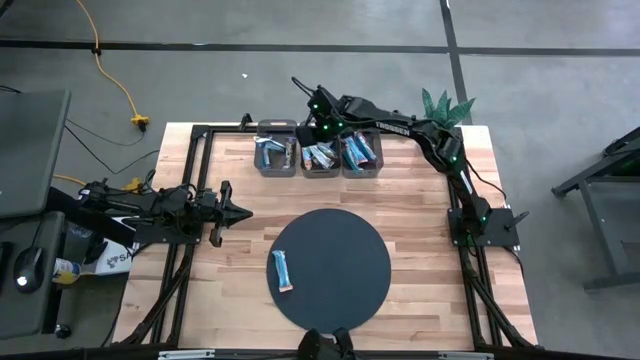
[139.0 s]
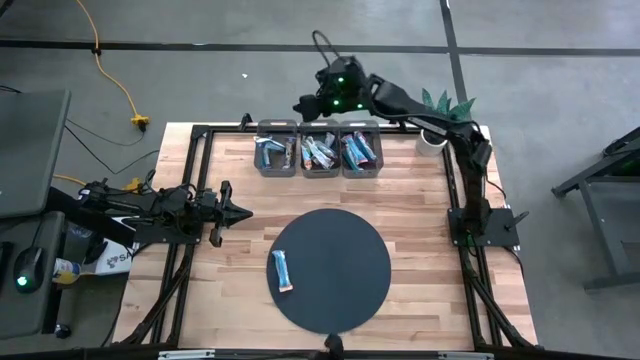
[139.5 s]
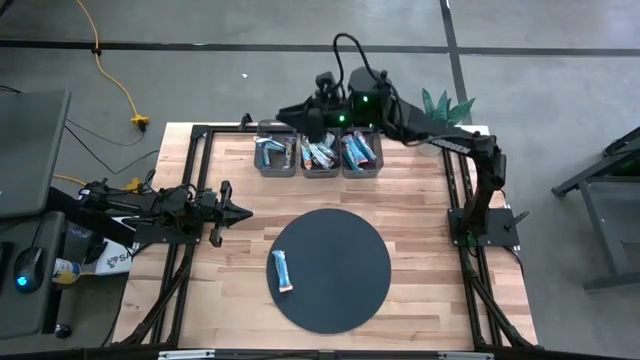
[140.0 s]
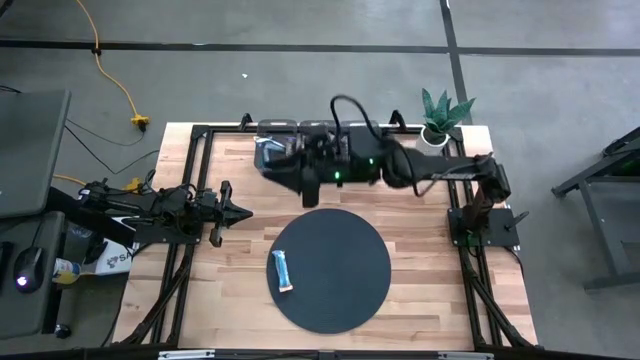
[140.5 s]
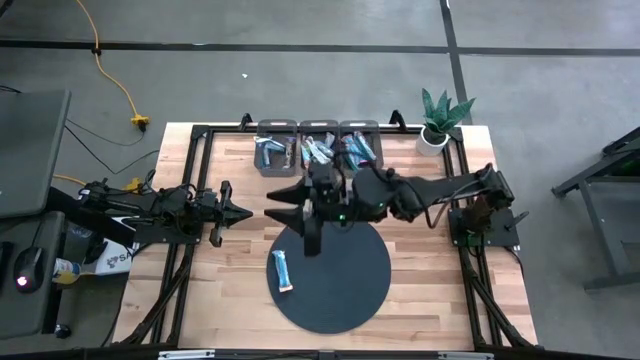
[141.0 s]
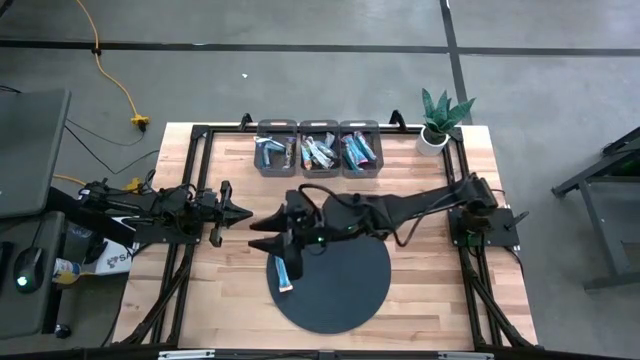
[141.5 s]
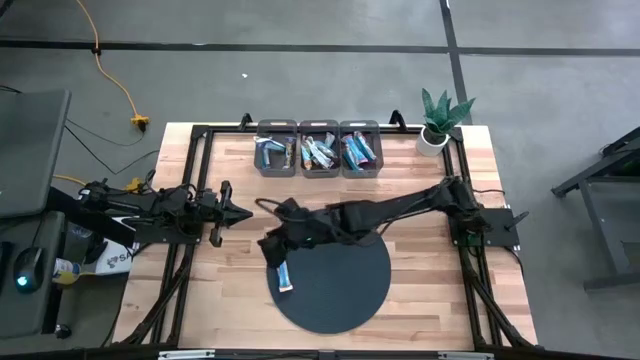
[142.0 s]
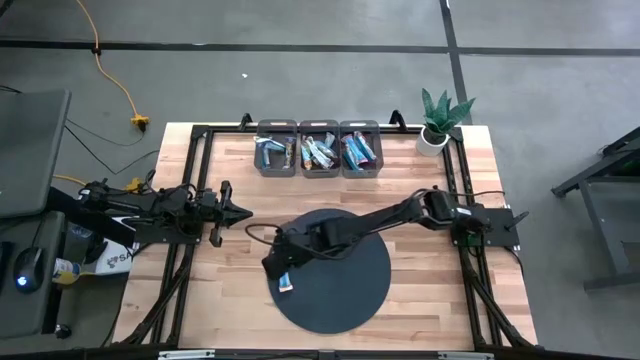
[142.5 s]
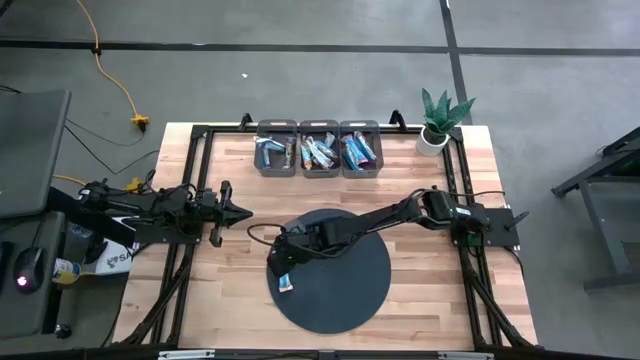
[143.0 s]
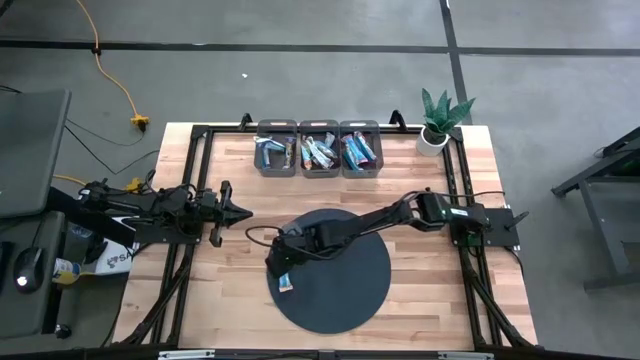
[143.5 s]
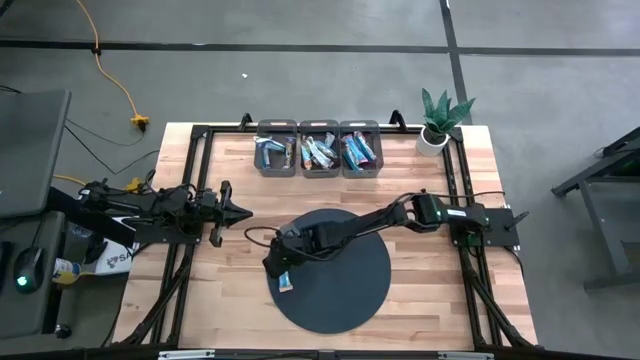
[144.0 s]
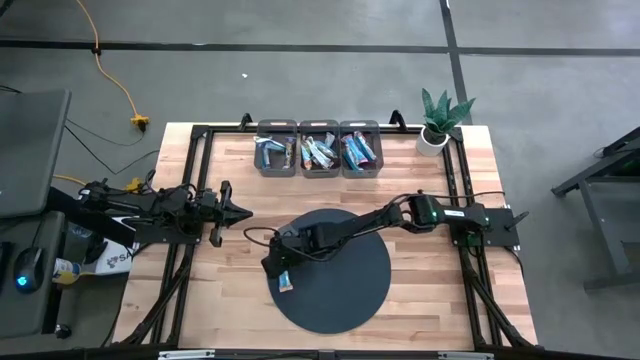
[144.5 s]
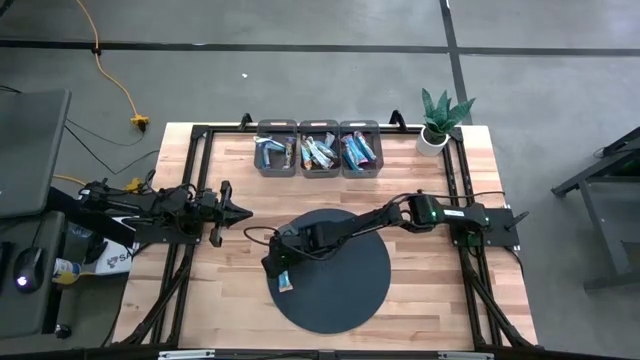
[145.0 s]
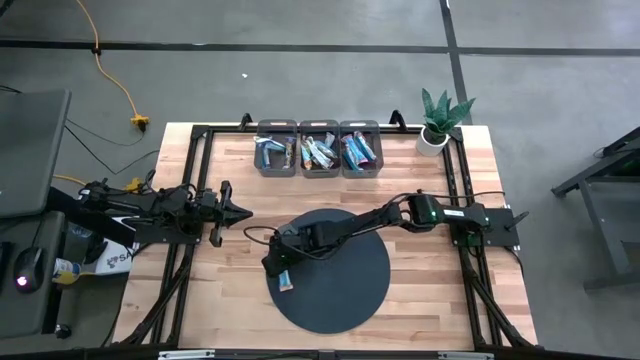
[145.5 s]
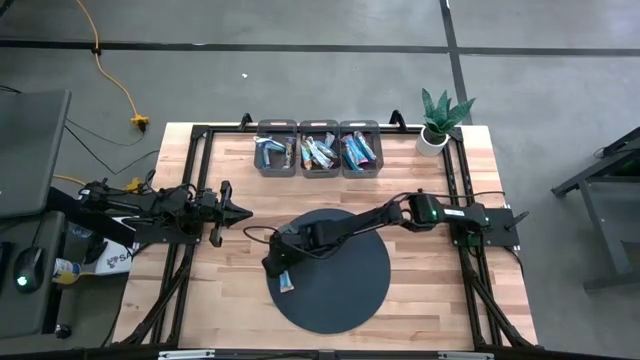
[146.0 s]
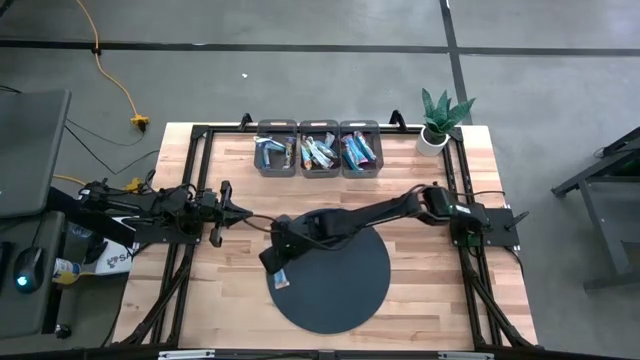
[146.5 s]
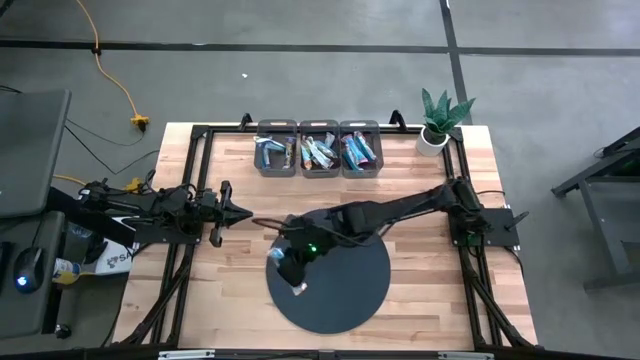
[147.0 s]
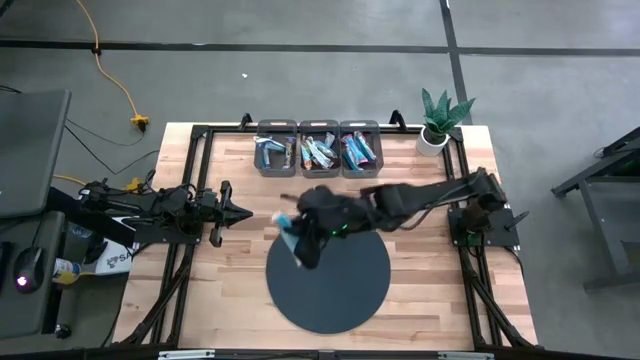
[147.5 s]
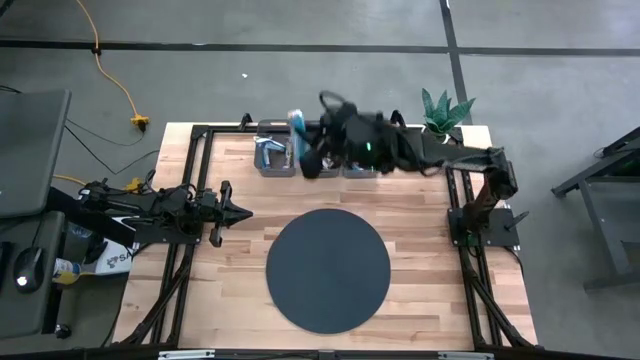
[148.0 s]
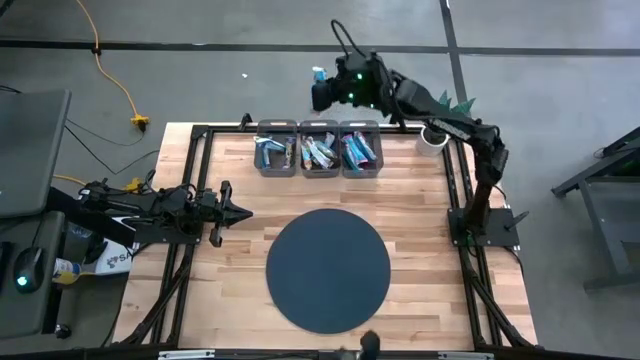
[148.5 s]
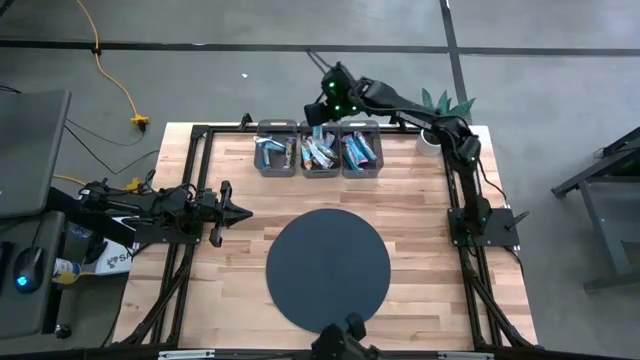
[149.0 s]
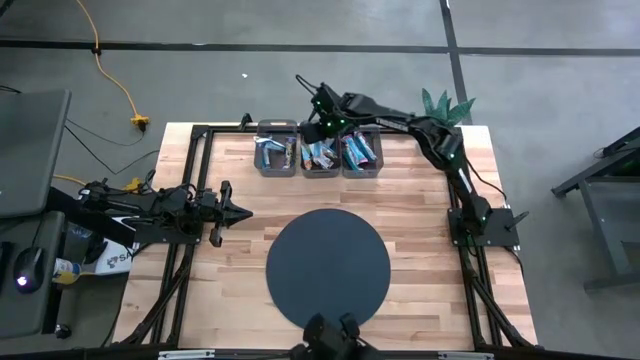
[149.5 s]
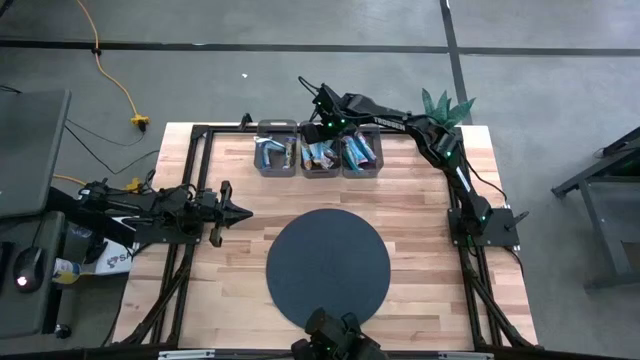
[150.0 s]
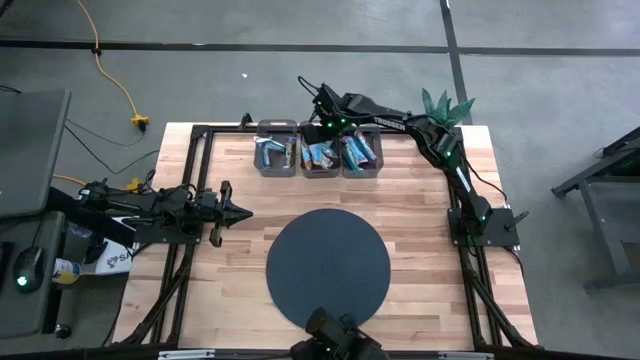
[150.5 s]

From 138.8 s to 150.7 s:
Task: Pick and place Granola Bars by type
Put the yellow granola bar into the middle black bin

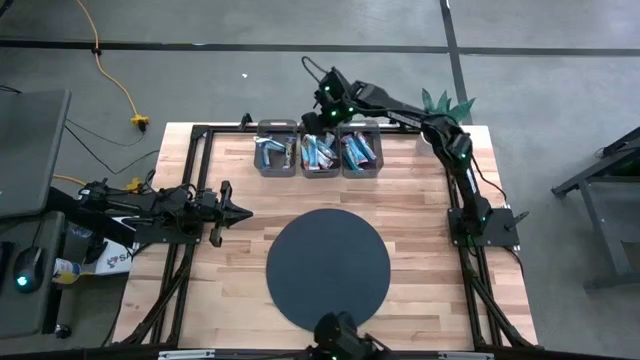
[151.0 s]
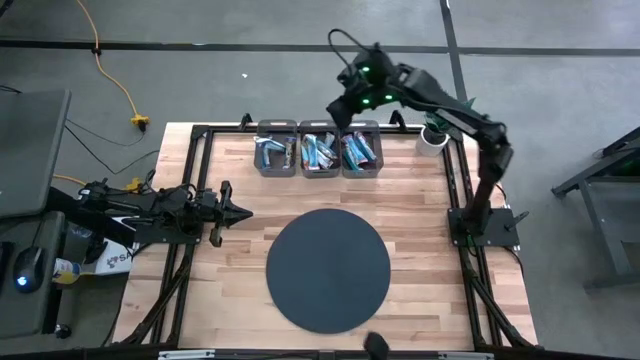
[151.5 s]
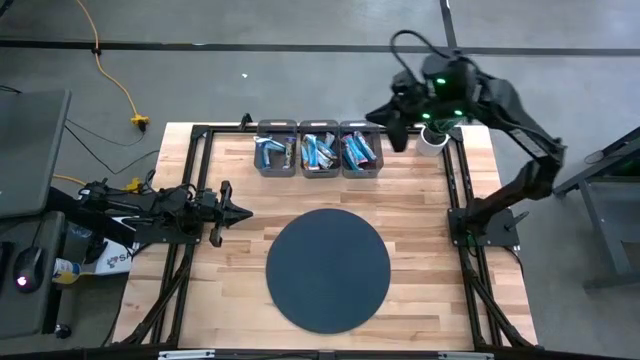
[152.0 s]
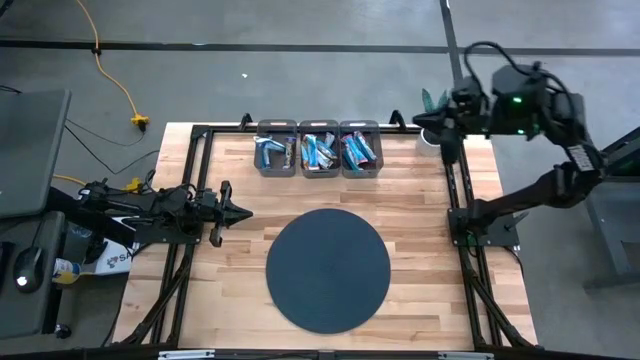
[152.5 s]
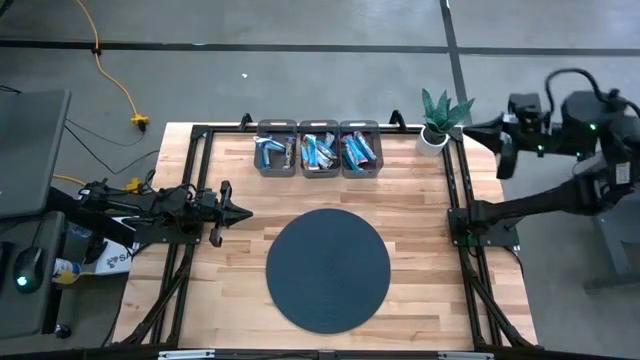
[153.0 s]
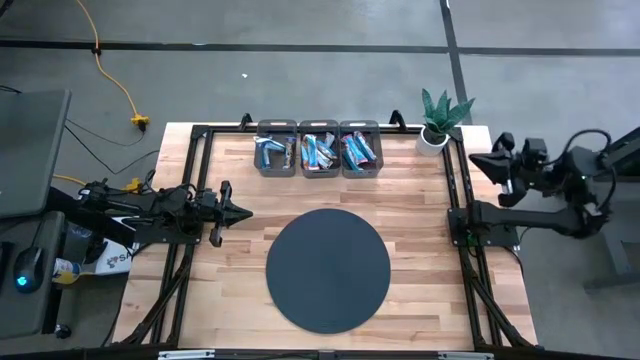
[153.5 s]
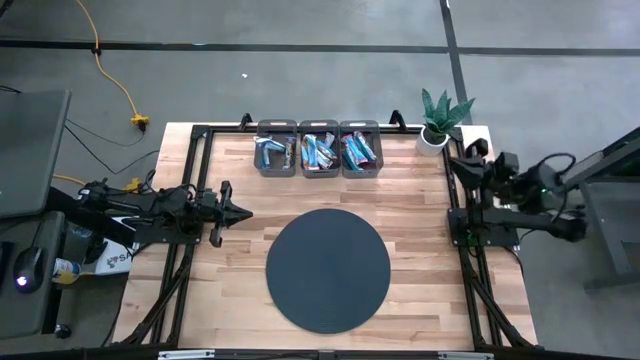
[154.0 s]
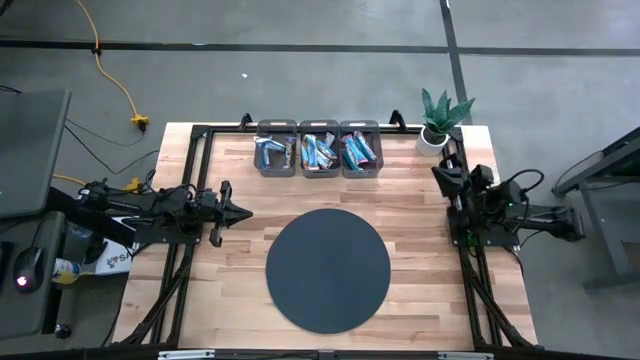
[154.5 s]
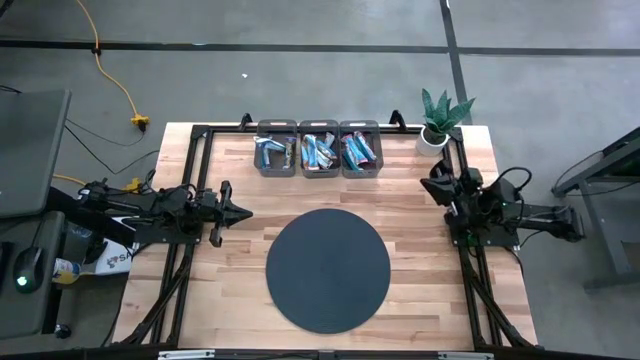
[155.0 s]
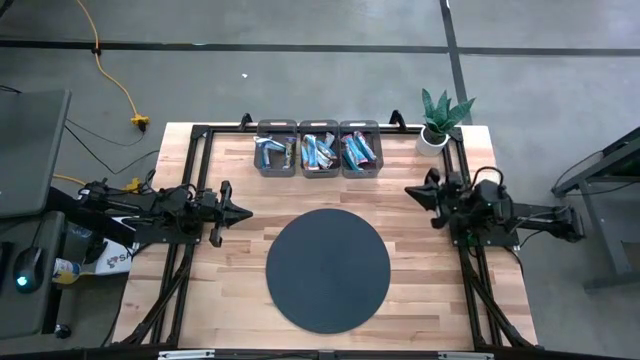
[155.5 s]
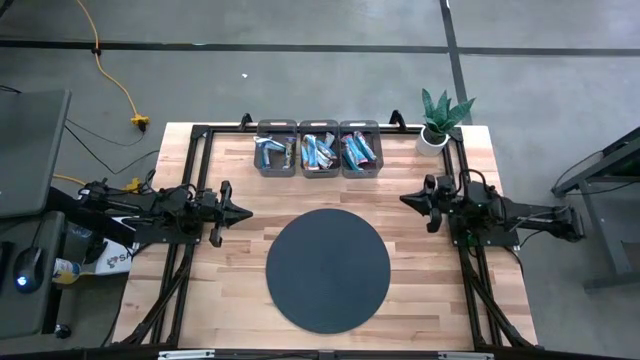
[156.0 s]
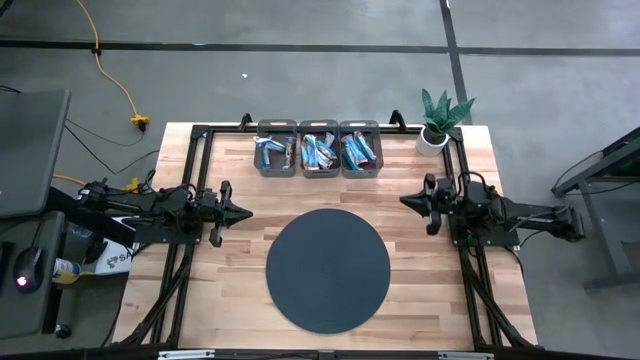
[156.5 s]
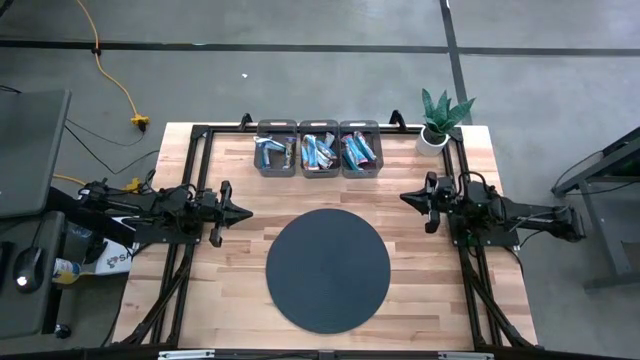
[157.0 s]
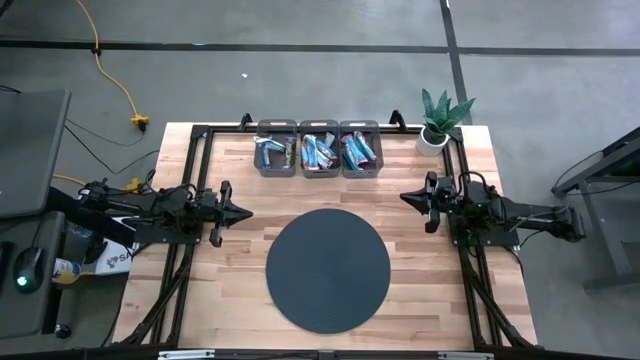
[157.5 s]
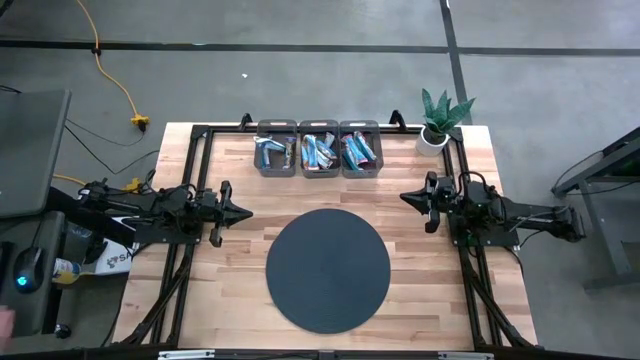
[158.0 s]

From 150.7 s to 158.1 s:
Return to Home Position

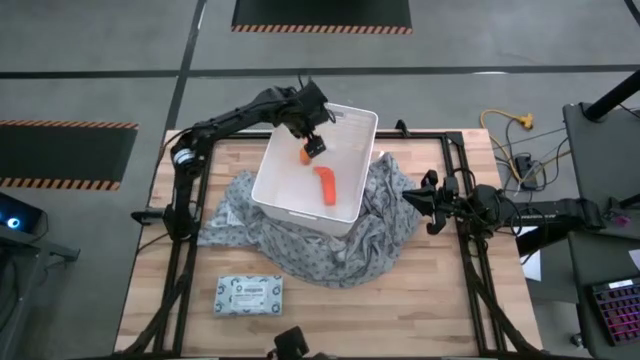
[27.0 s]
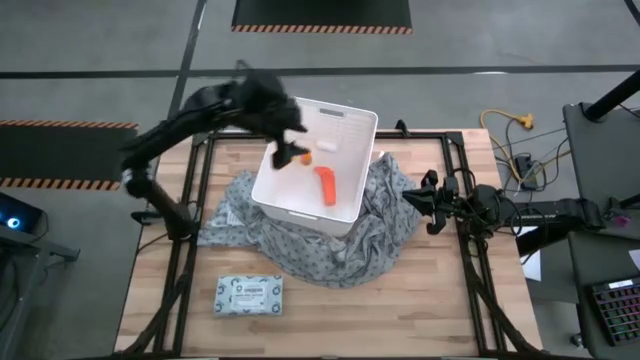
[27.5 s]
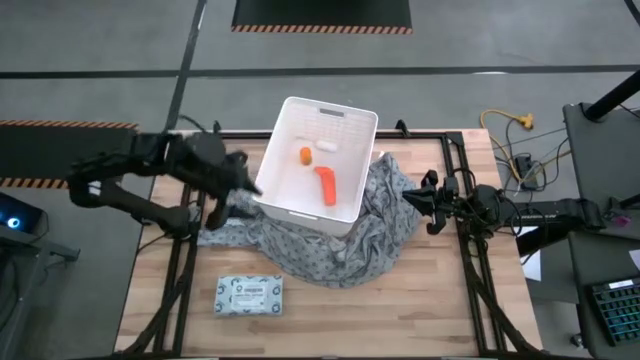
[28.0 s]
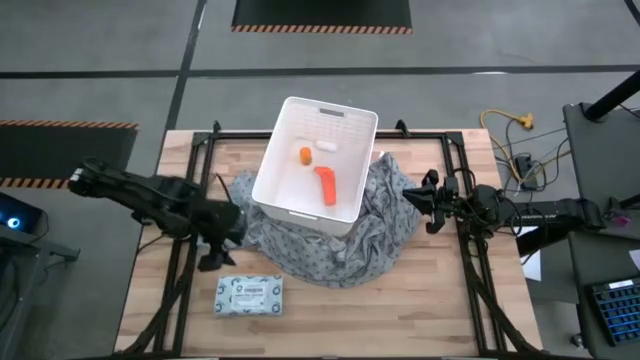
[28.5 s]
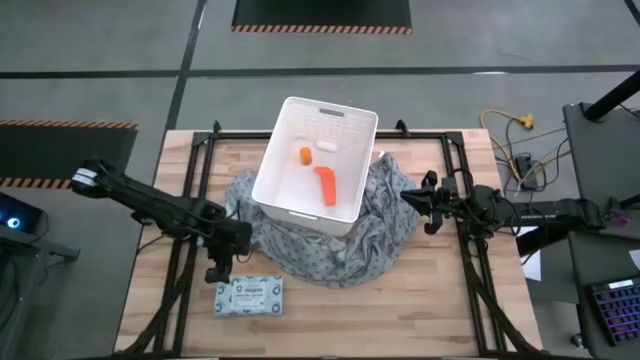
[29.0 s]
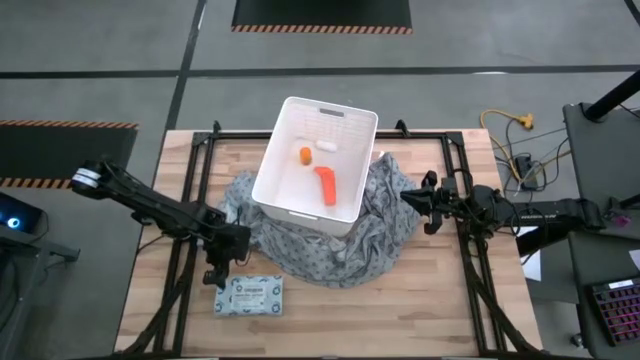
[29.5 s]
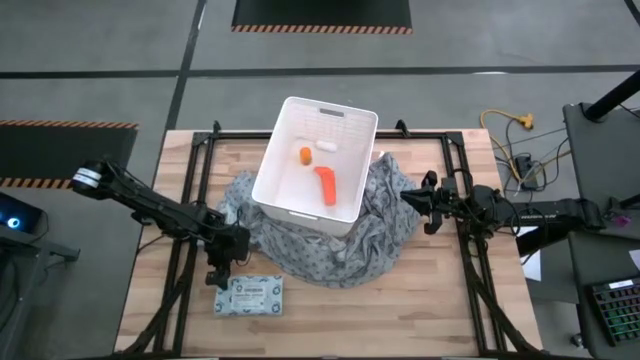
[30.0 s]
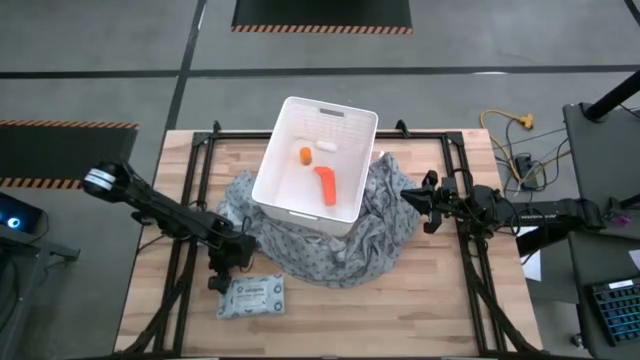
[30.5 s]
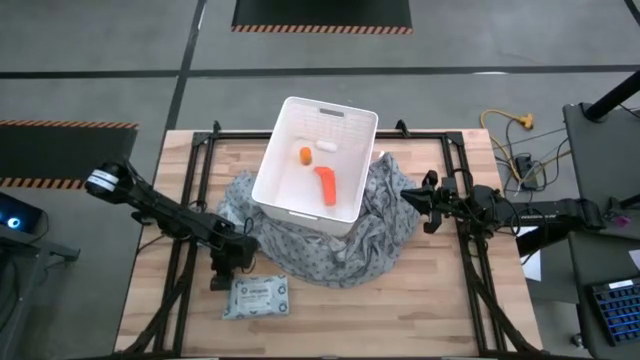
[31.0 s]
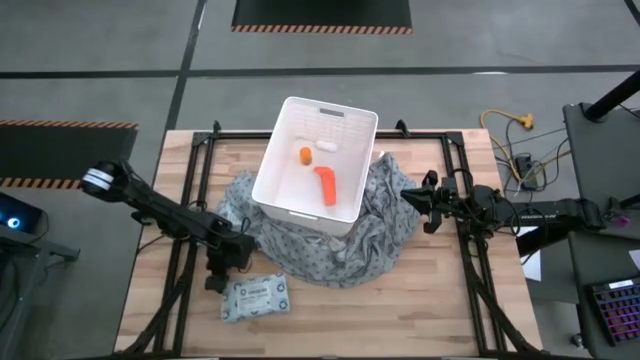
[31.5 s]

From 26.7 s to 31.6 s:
Task: Pick & place medical supplies in basket/bin
Put the mailer bag into the white basket
